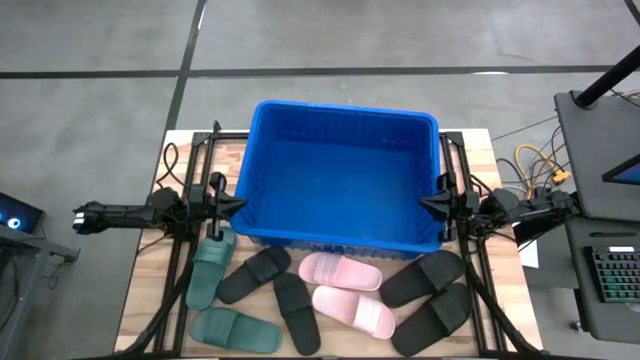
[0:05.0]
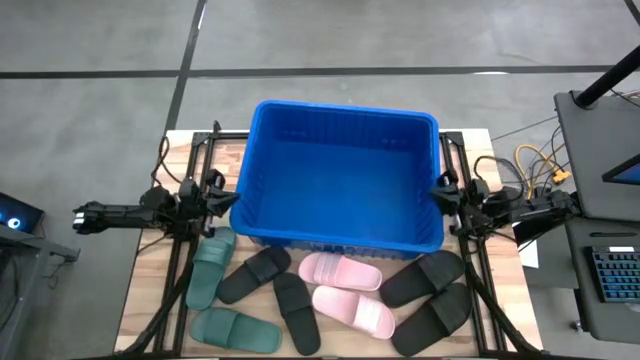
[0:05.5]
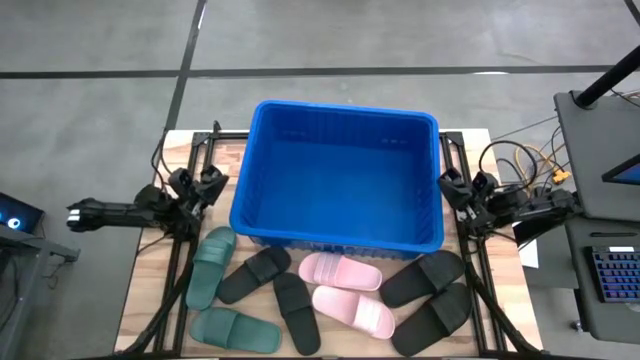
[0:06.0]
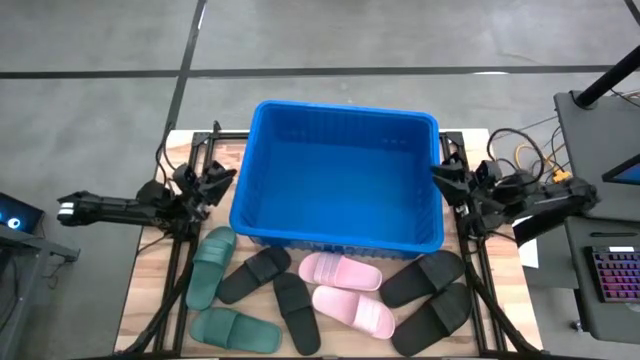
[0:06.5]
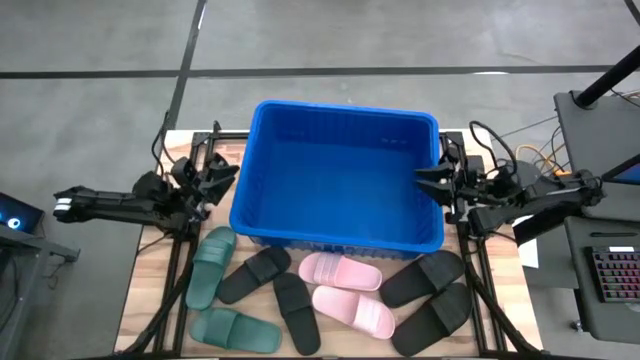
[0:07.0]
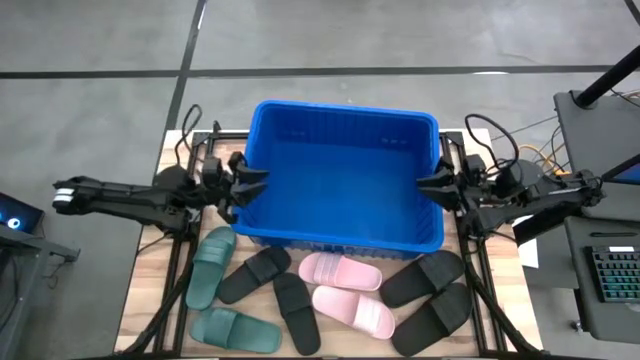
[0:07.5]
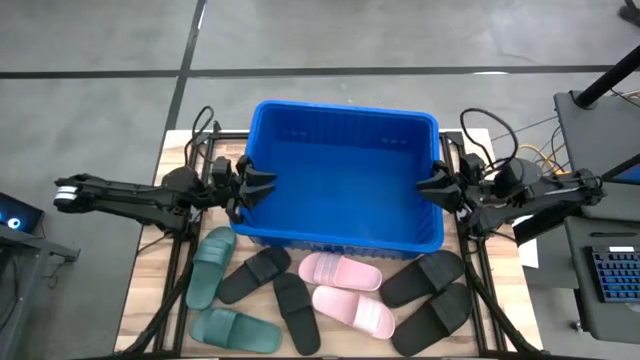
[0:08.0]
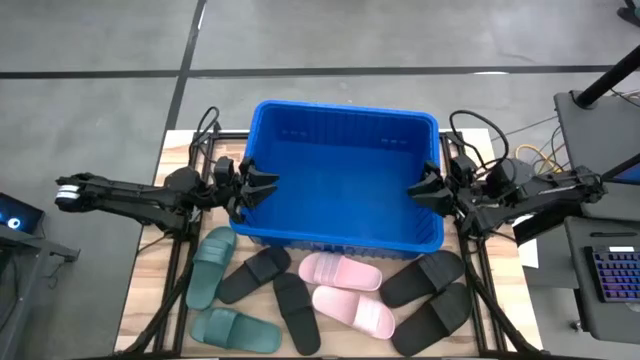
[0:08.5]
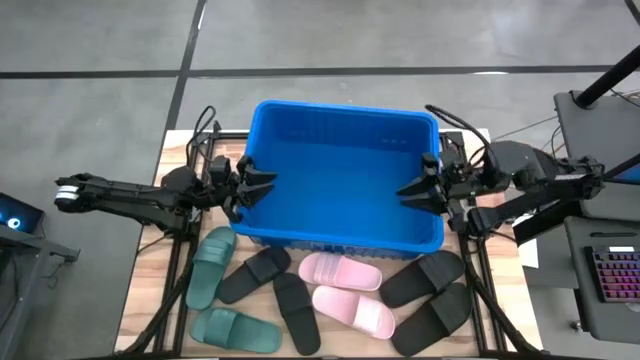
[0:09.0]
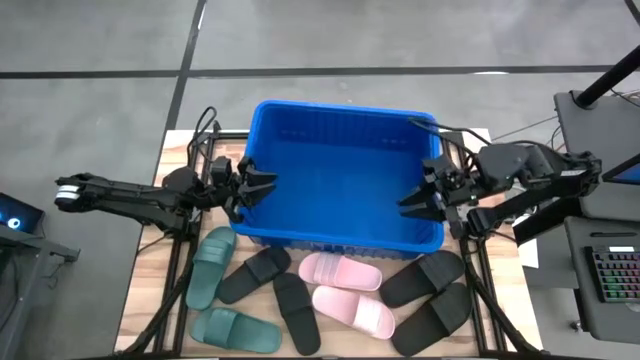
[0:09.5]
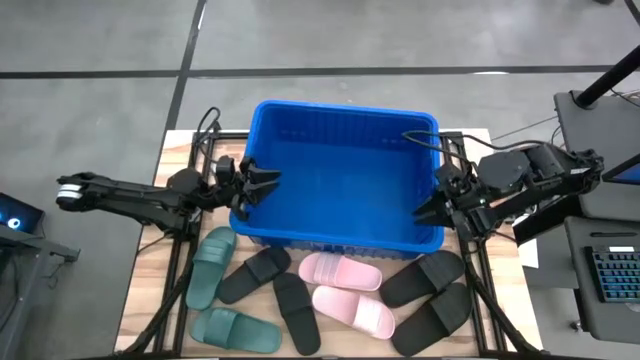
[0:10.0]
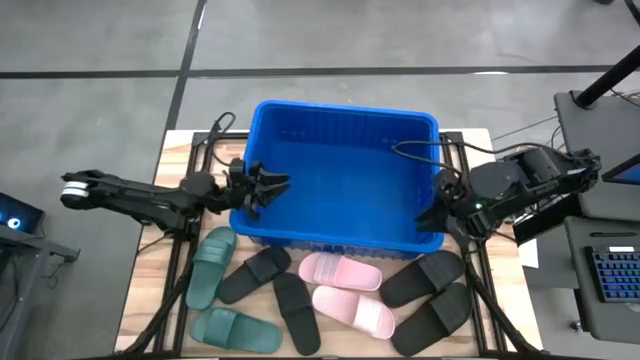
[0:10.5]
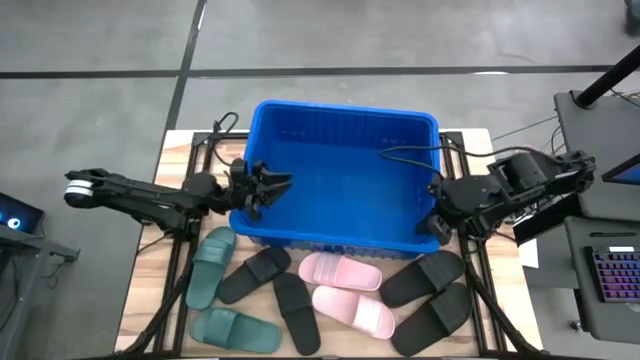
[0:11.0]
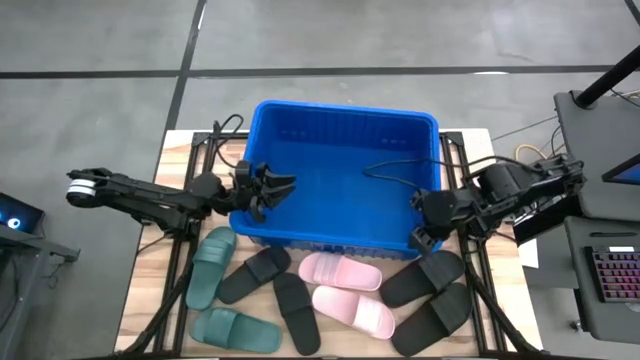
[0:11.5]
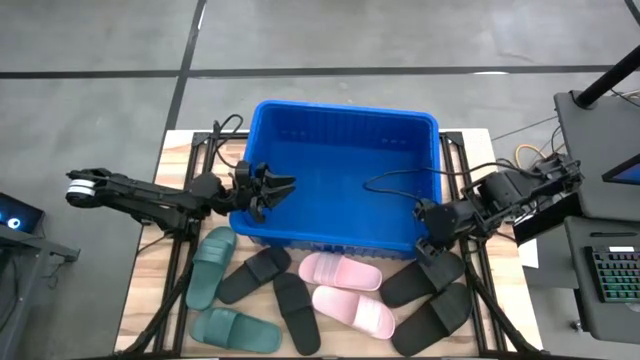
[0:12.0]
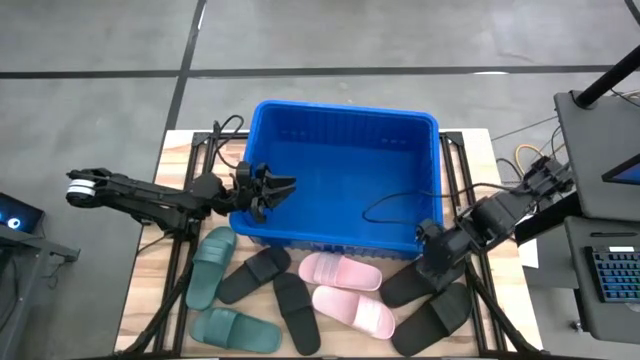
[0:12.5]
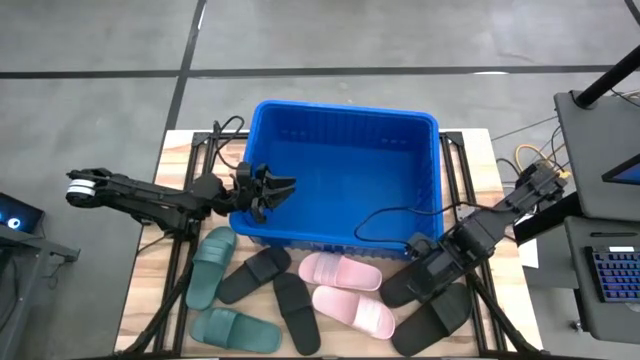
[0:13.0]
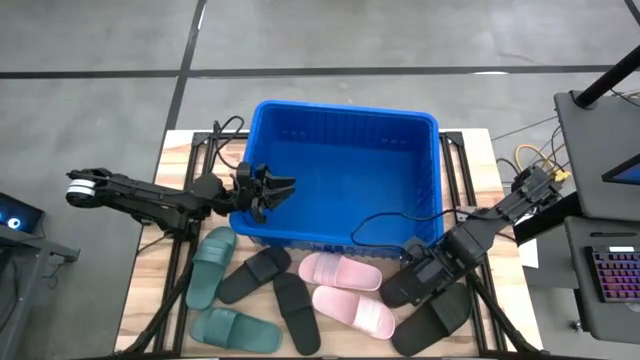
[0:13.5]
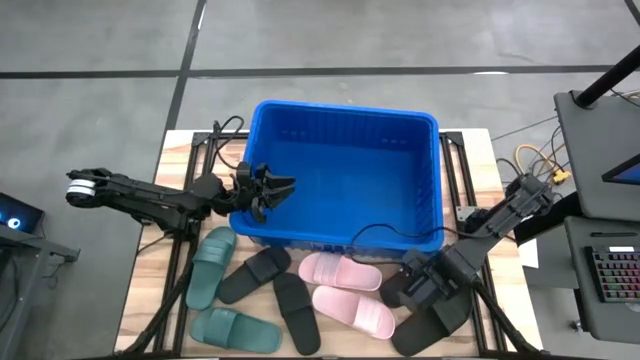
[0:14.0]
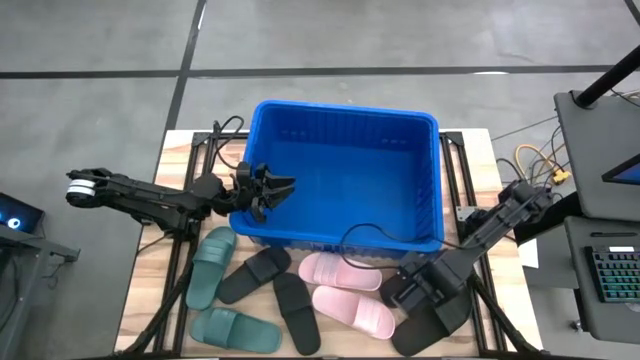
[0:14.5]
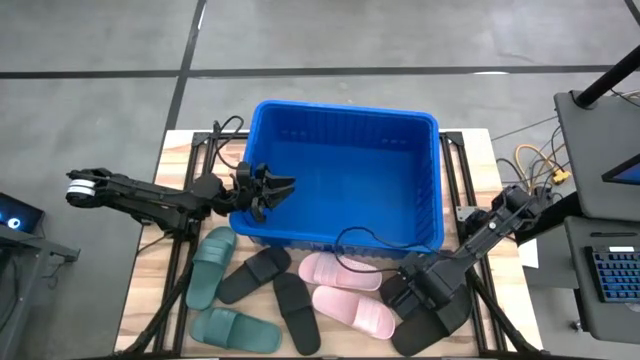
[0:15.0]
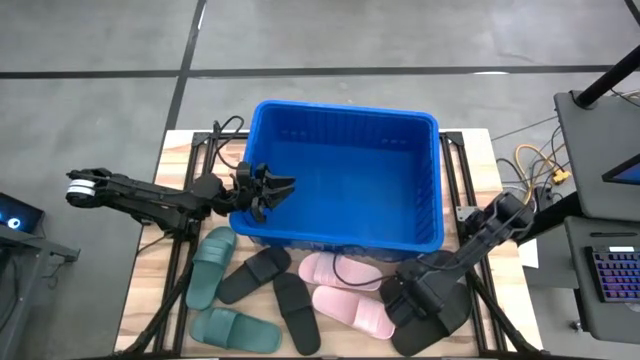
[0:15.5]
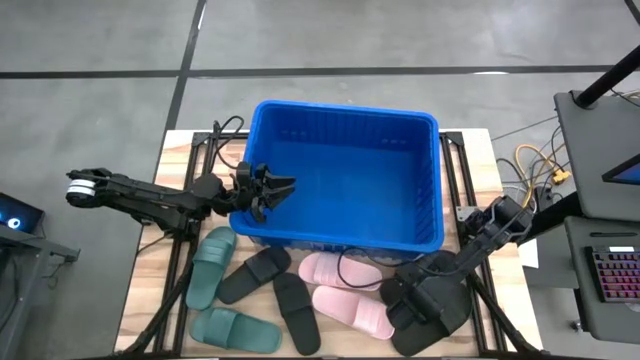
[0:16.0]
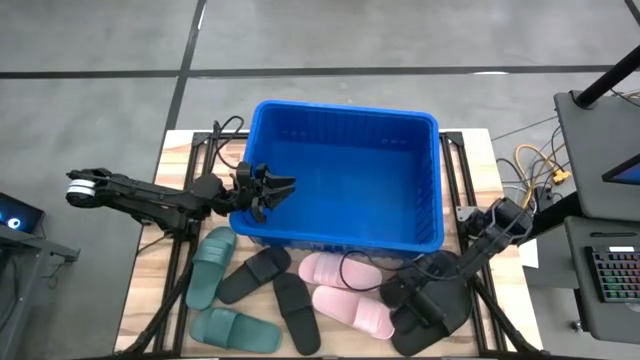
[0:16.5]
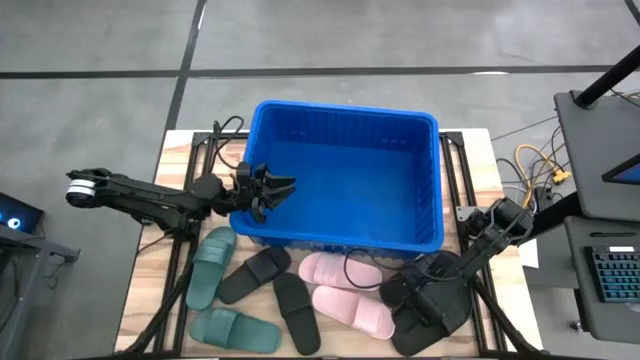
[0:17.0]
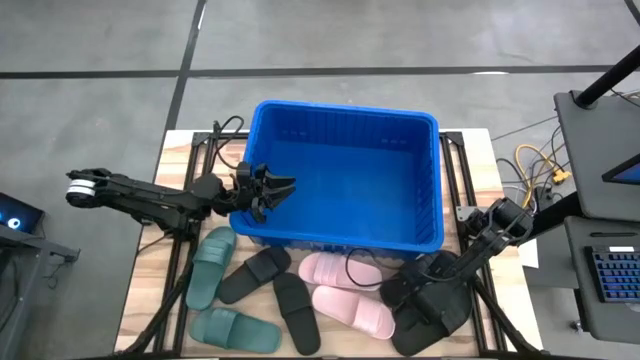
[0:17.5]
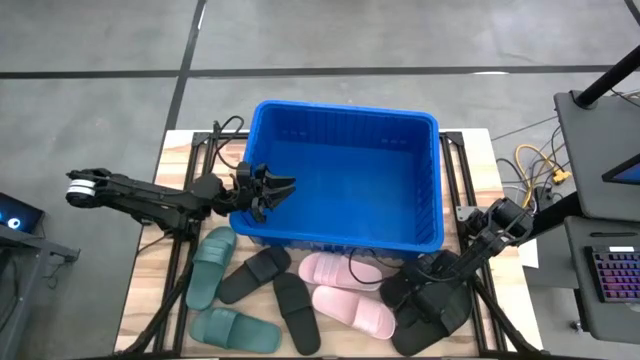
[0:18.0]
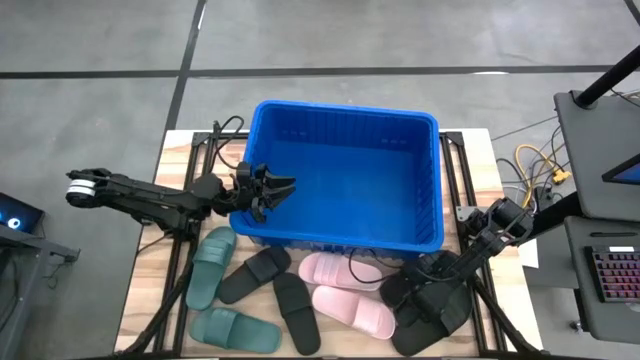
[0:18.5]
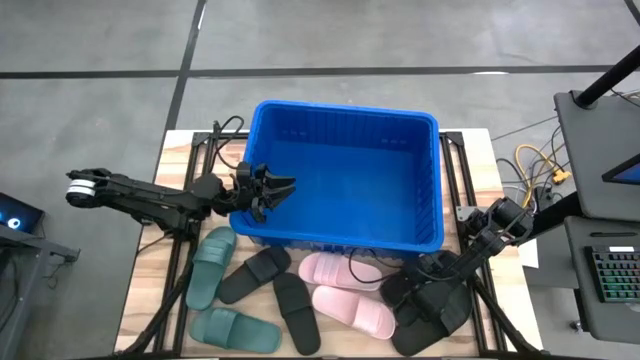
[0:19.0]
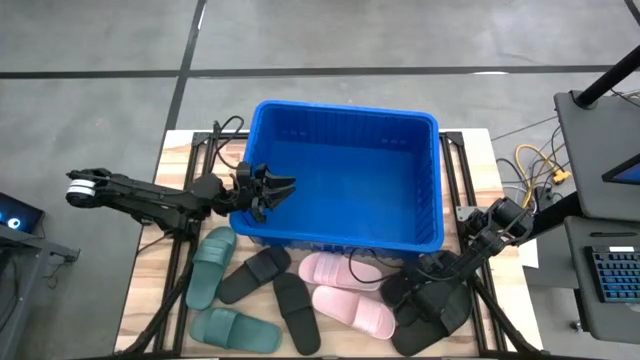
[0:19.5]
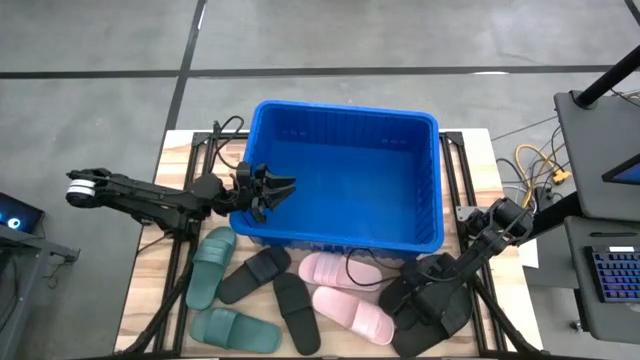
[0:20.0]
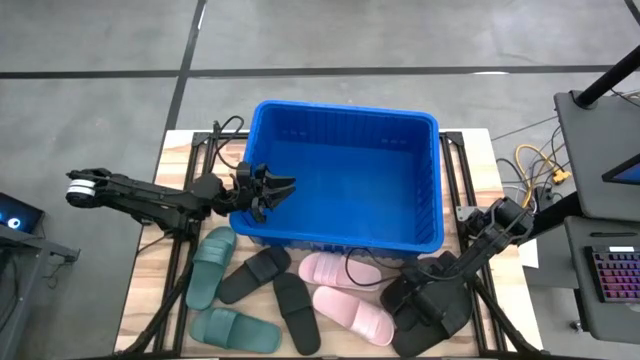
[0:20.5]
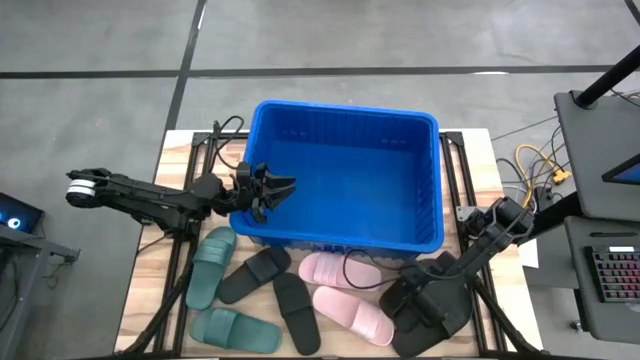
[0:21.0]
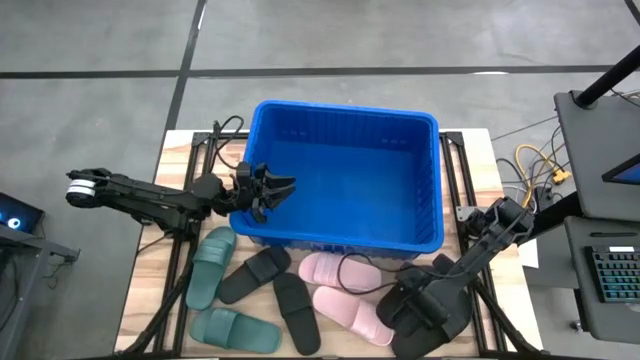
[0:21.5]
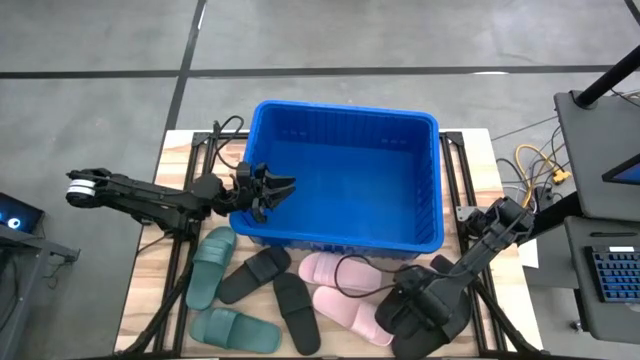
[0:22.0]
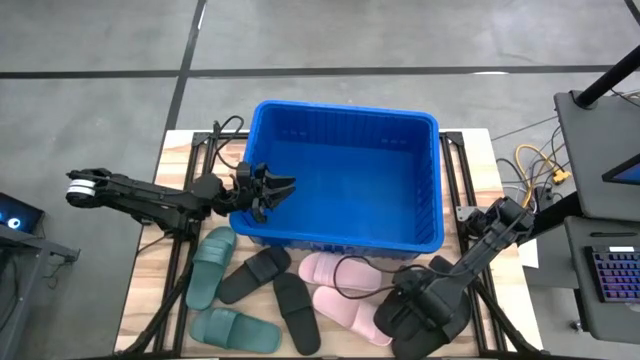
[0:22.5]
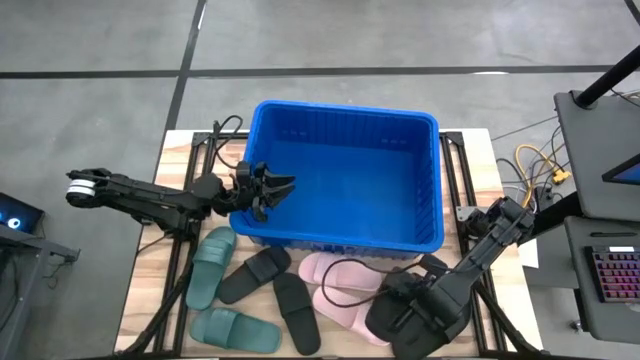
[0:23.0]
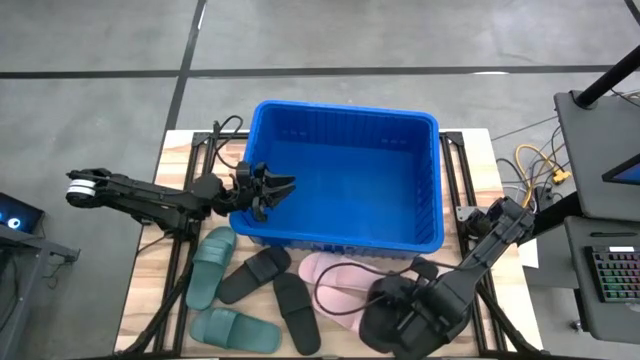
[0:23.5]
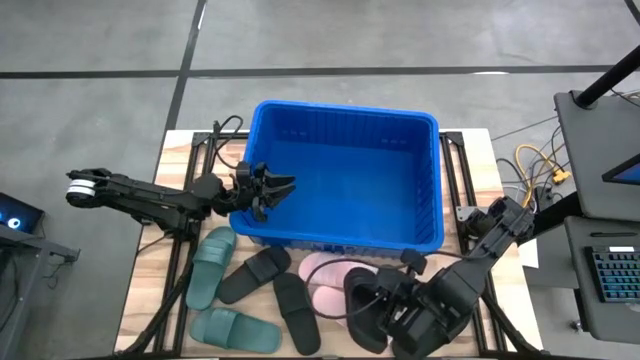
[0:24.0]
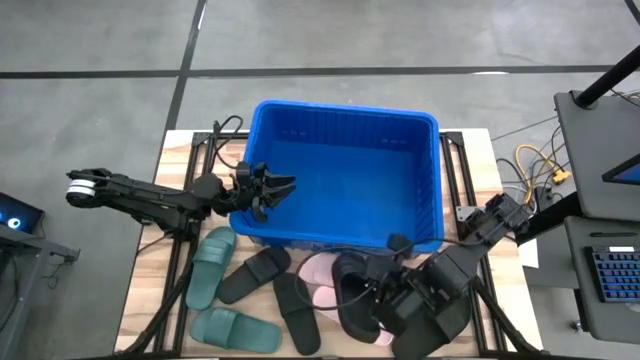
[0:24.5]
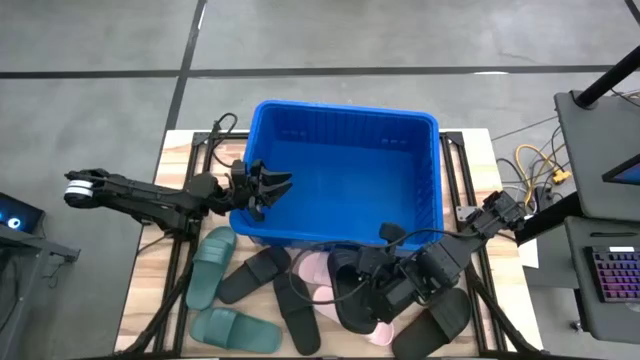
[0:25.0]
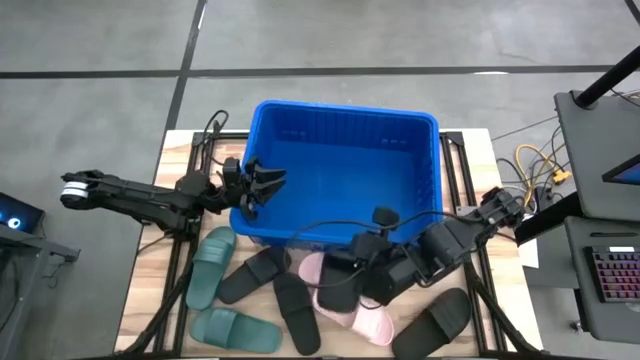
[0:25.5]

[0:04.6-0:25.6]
Task: Pick and place slides into bin
Put the top right black slide into the blue bin
